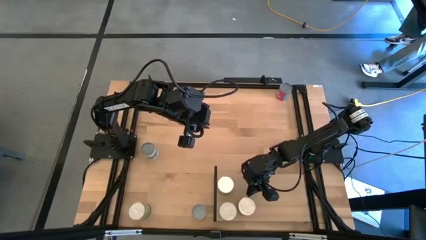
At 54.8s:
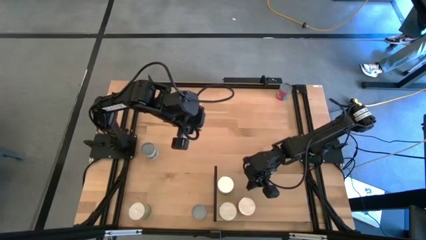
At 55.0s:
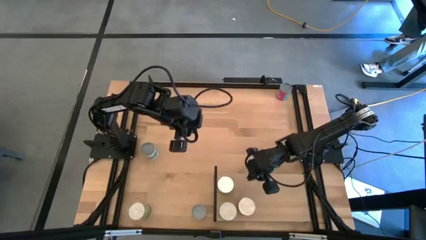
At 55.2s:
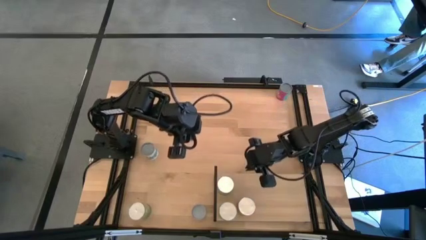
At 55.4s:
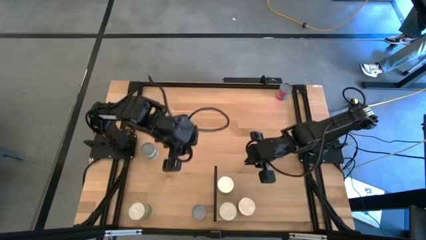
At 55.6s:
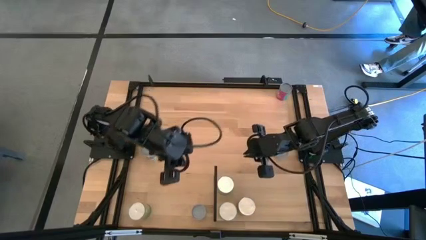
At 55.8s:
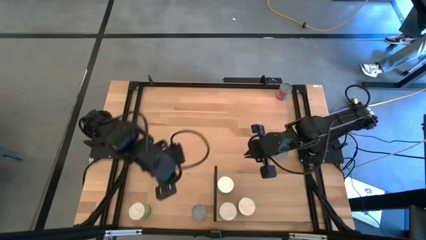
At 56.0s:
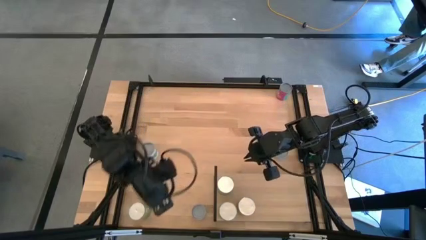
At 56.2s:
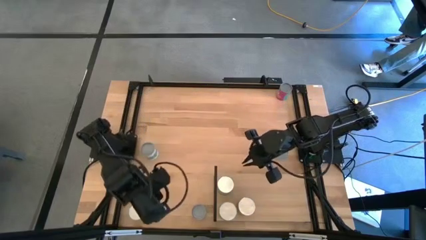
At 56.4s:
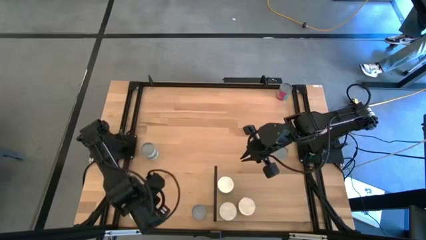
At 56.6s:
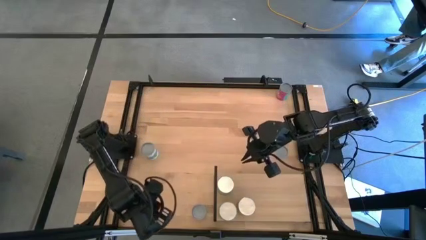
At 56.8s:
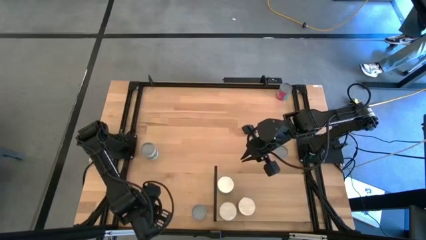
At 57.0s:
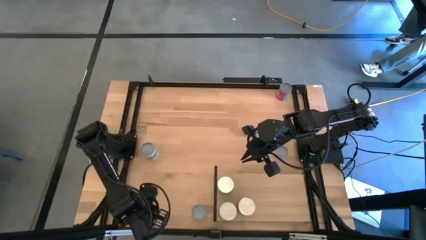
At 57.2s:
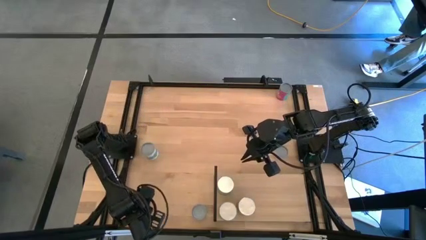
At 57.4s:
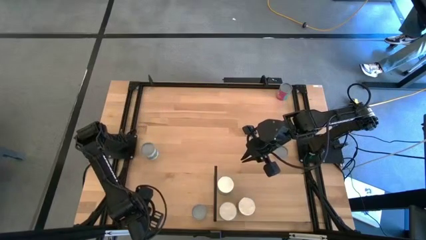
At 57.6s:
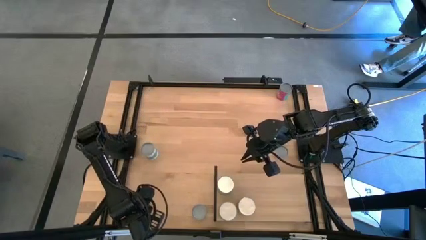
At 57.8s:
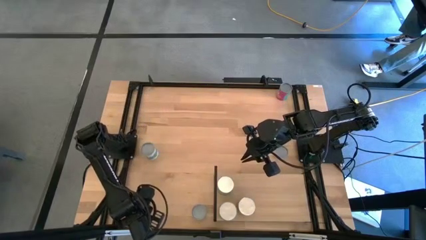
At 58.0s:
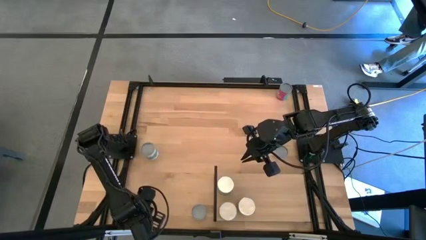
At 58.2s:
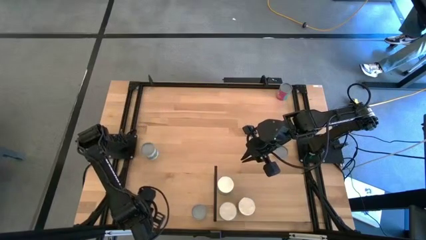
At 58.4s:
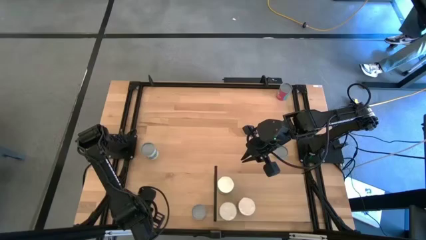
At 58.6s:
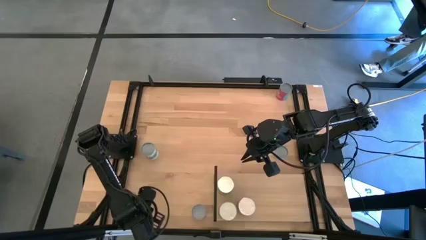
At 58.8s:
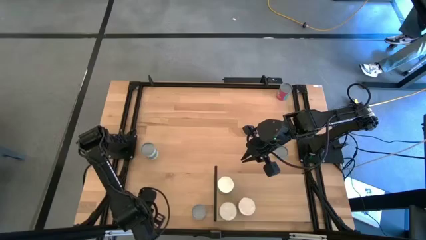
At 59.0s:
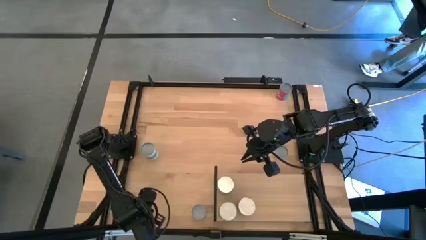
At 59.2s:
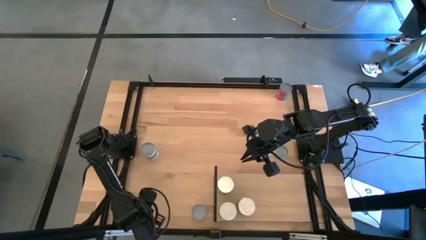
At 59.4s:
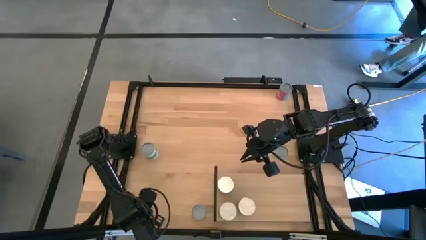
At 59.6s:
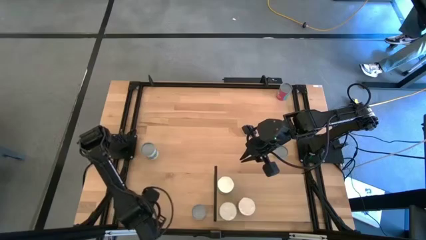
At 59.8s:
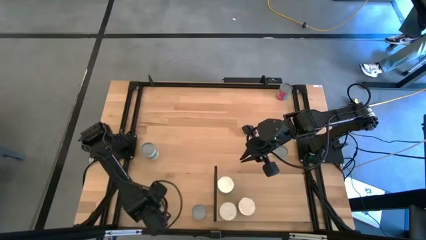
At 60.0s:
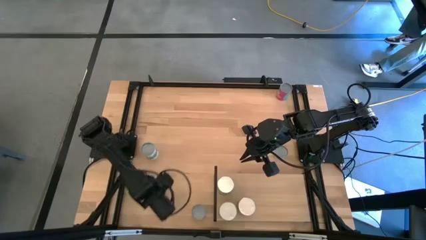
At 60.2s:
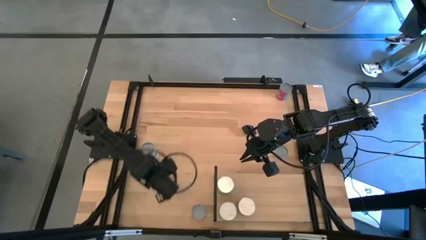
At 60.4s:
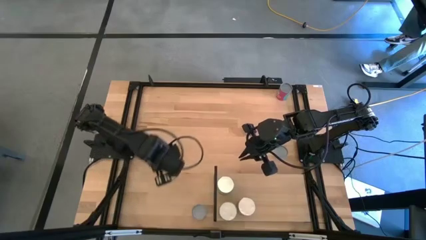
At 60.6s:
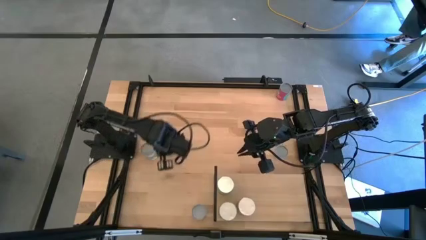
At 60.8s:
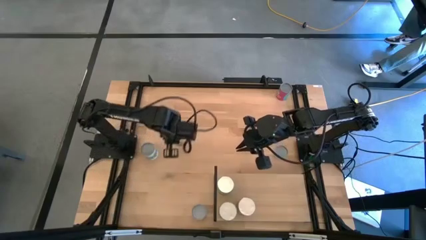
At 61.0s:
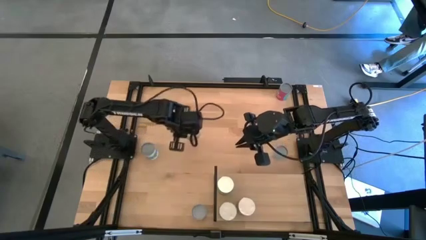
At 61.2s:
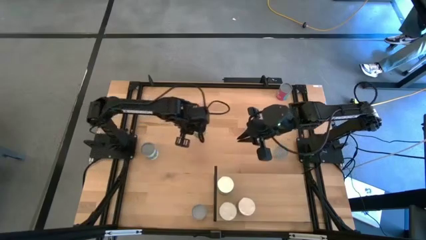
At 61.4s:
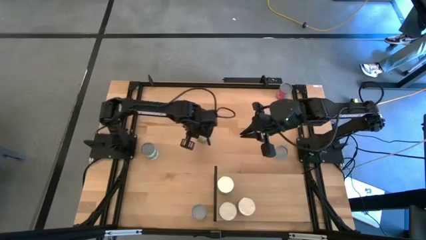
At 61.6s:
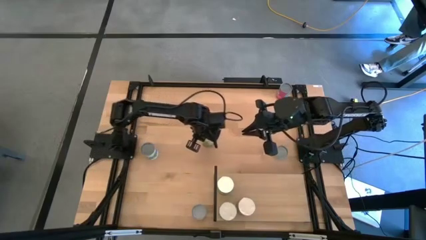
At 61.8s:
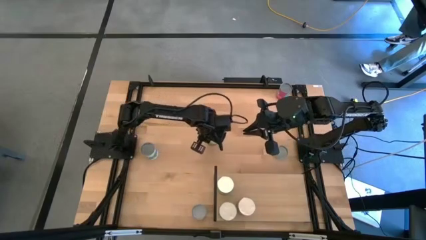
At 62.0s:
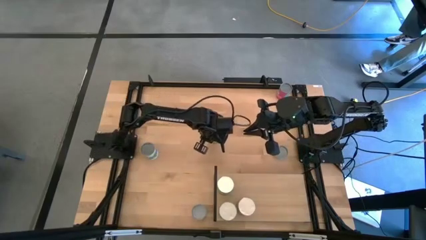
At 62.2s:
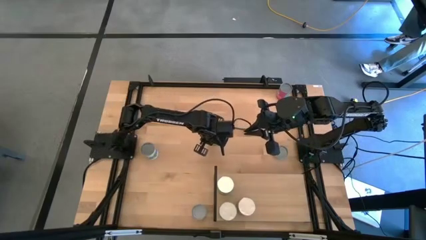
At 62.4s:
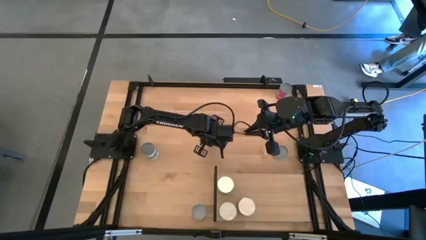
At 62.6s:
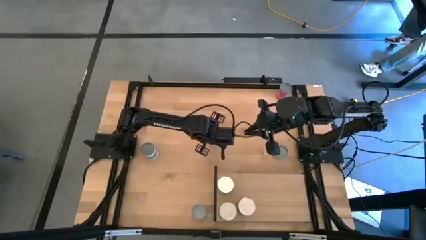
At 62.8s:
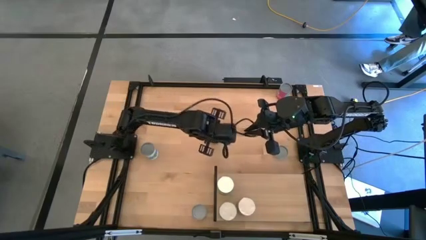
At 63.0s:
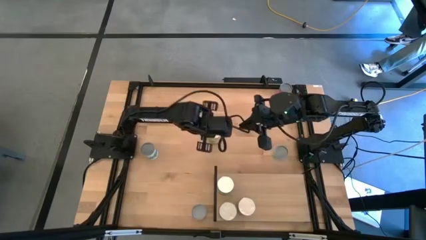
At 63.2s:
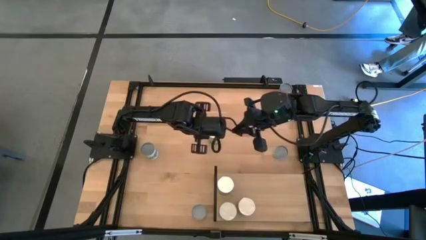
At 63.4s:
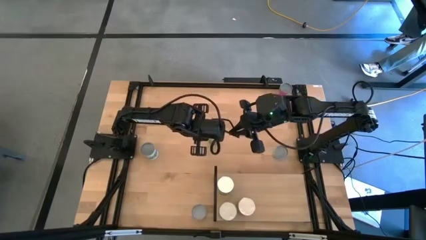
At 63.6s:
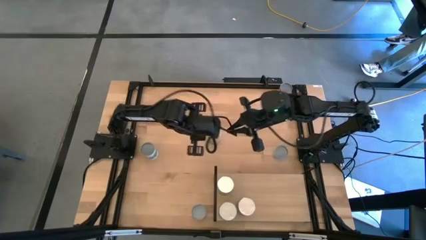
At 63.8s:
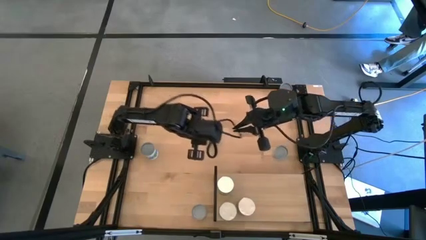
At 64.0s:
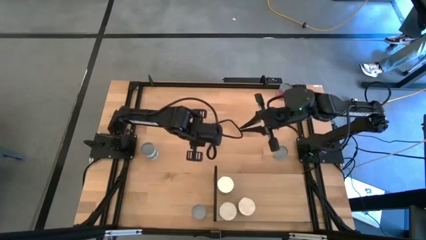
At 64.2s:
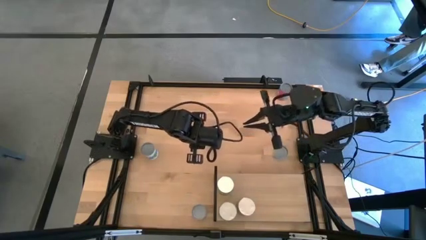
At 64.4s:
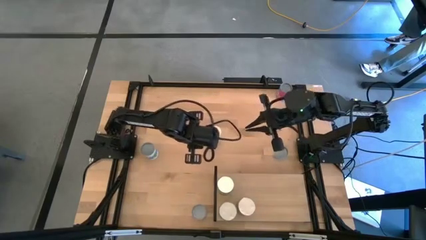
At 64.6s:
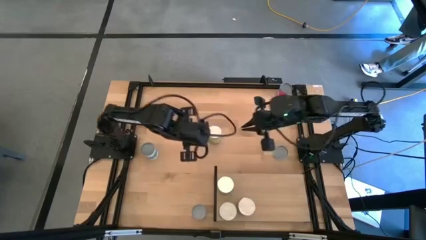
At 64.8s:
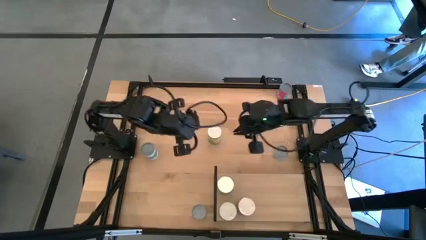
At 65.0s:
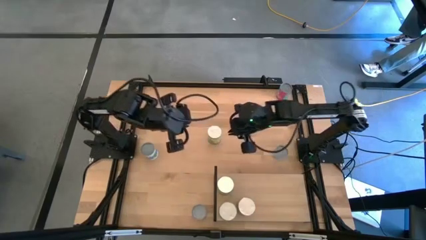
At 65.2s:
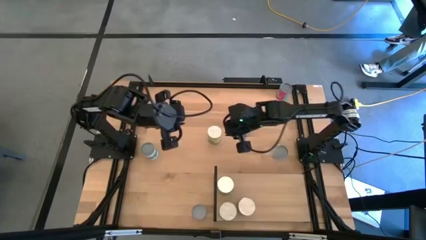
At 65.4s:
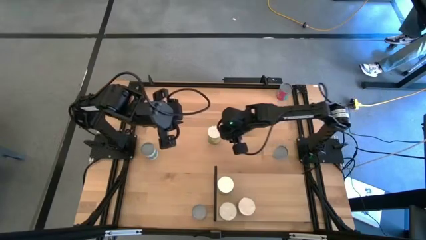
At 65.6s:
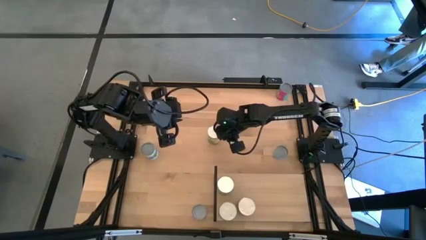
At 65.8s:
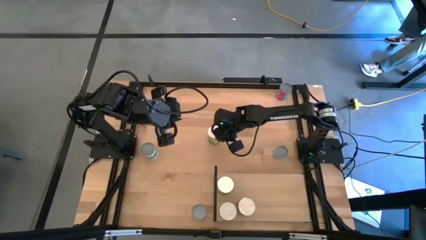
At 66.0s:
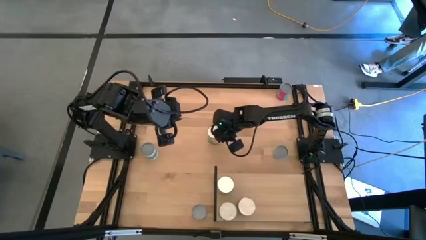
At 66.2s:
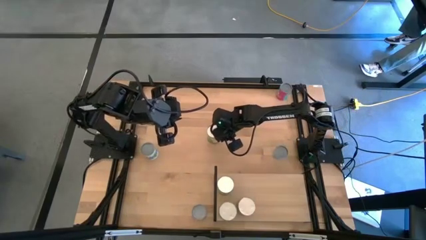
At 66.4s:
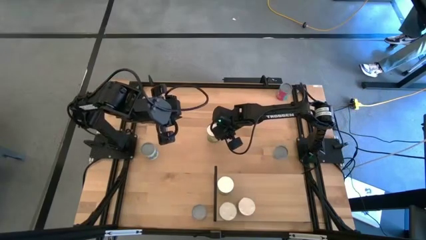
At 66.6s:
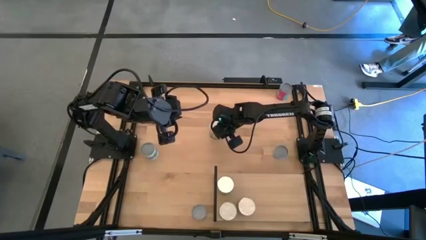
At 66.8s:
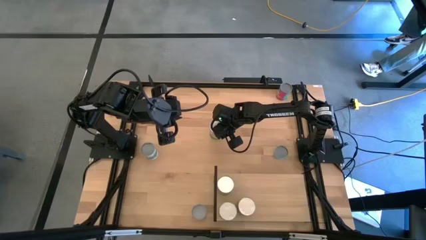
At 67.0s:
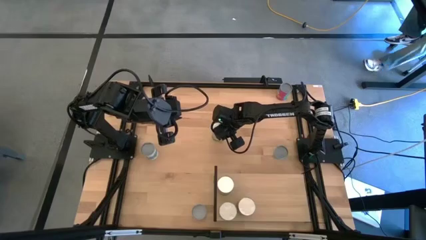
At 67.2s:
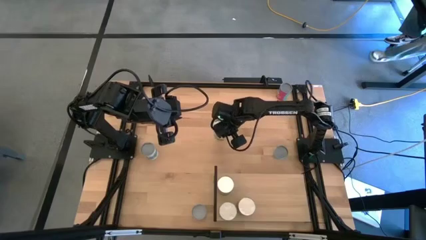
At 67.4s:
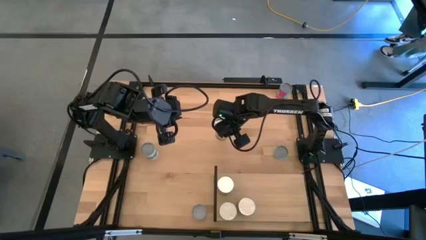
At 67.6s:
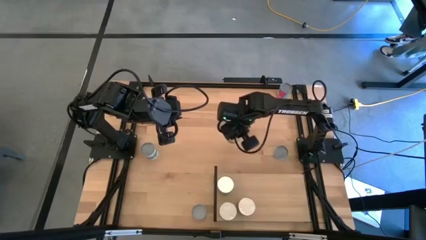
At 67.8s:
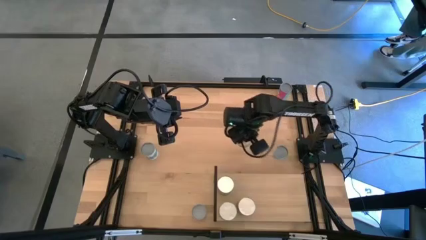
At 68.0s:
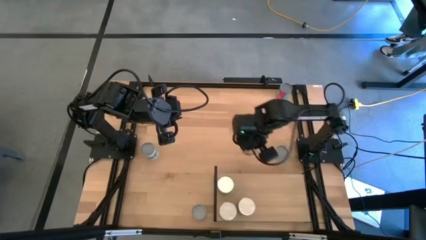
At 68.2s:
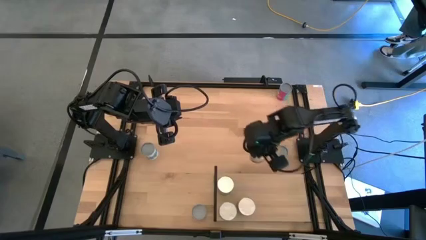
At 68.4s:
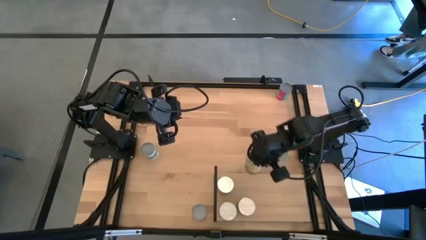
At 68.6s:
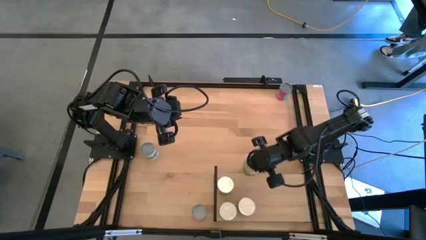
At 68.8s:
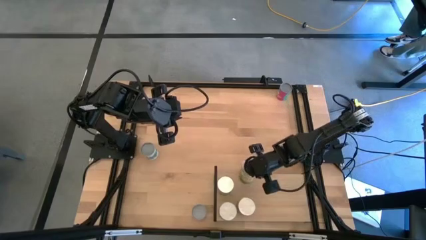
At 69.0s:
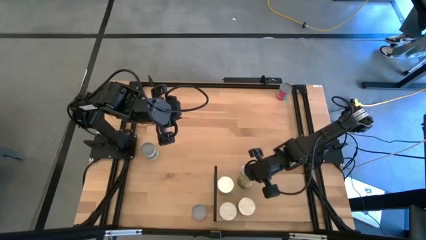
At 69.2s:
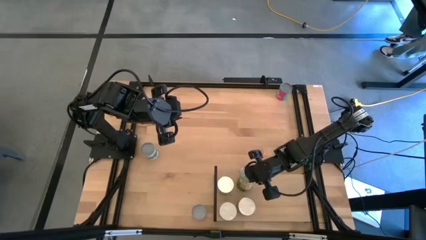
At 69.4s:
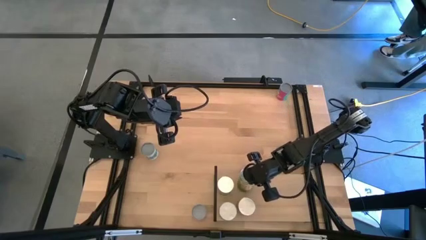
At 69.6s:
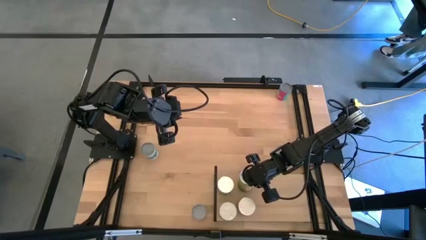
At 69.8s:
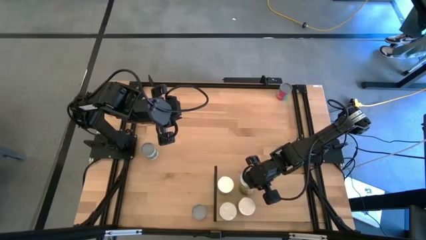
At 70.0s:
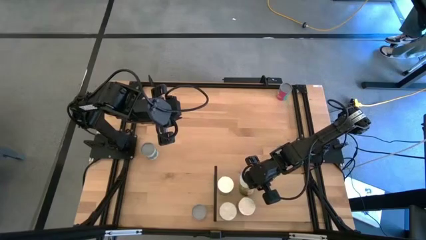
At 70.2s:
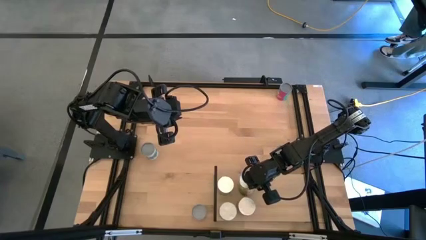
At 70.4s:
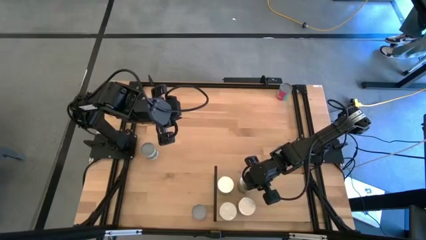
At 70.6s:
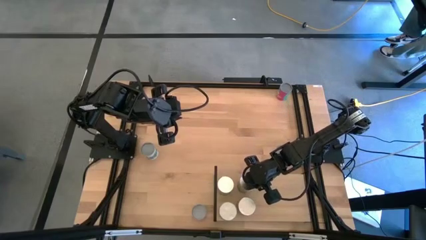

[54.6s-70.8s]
Task: Pick and place cans onto a shelf
Put the canned orange on the shelf
